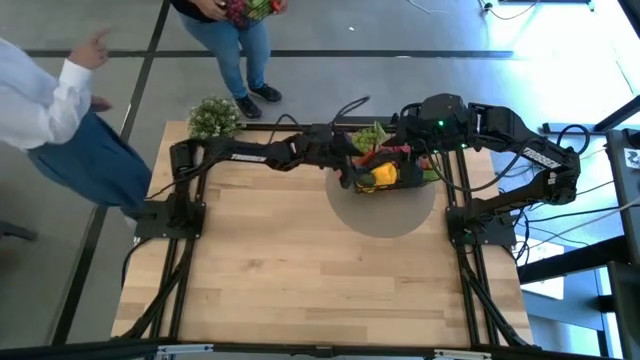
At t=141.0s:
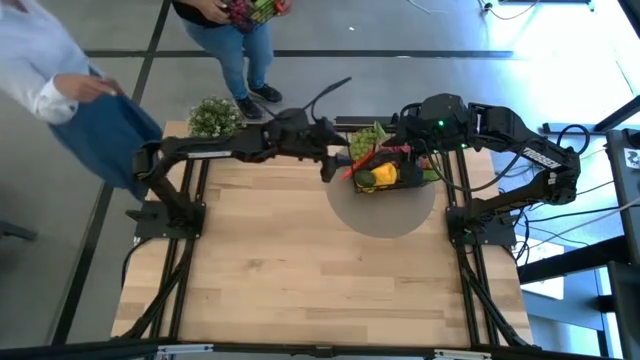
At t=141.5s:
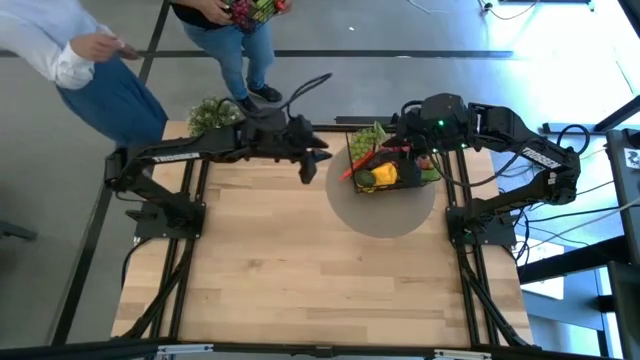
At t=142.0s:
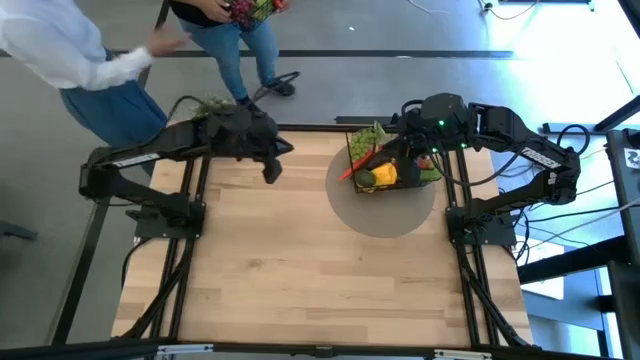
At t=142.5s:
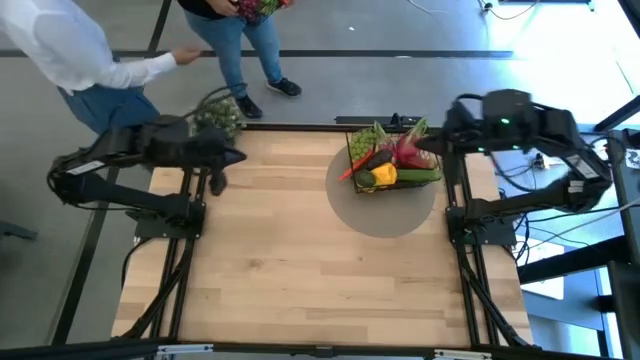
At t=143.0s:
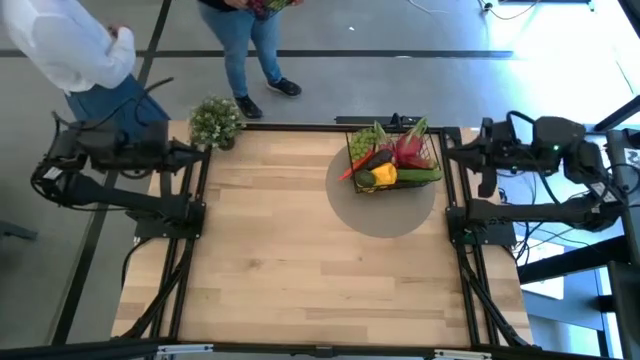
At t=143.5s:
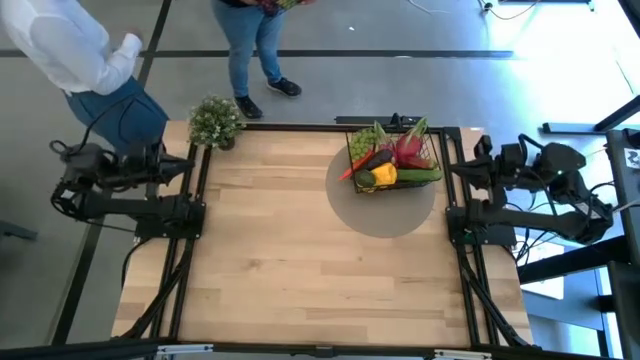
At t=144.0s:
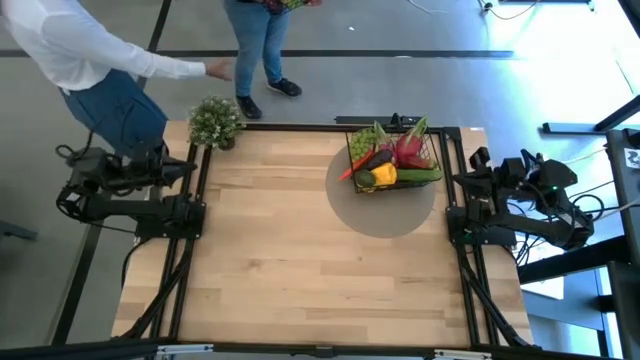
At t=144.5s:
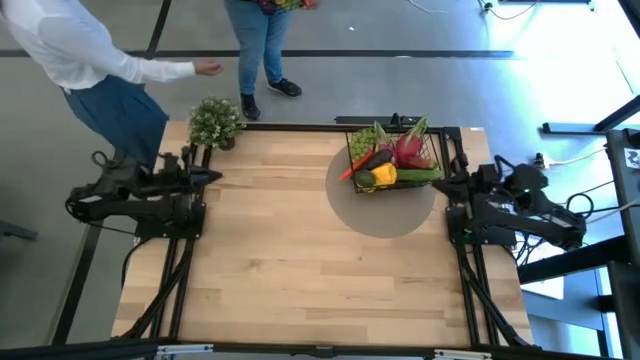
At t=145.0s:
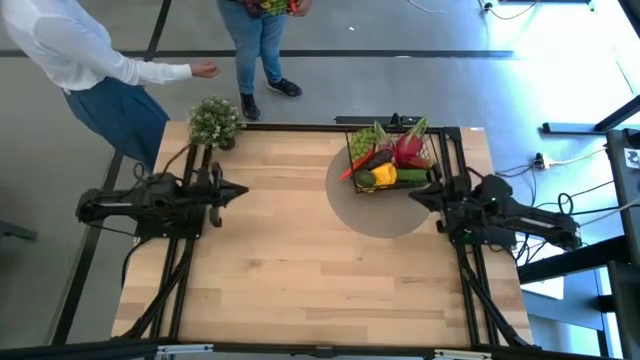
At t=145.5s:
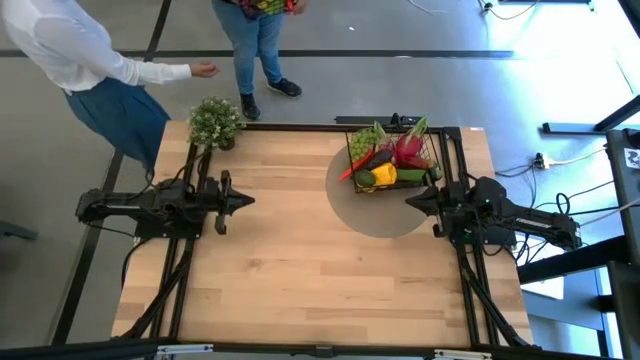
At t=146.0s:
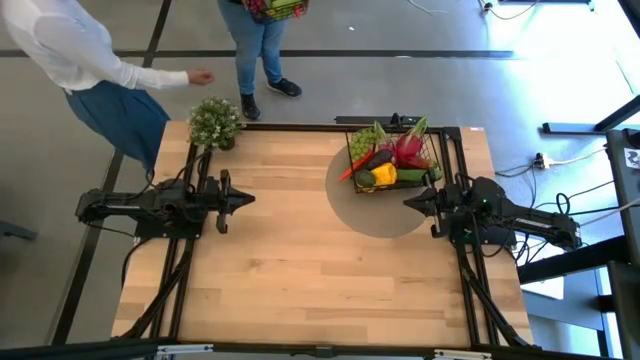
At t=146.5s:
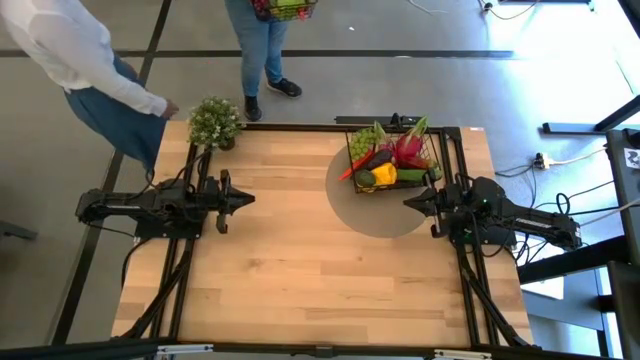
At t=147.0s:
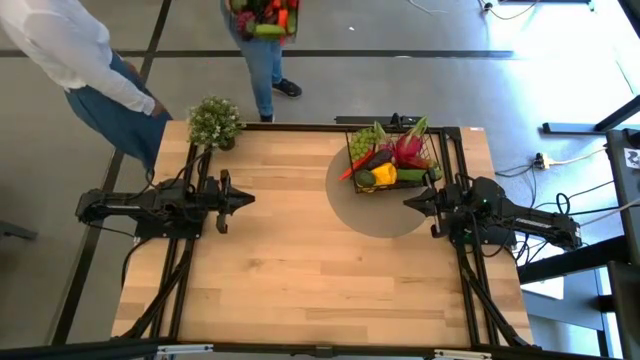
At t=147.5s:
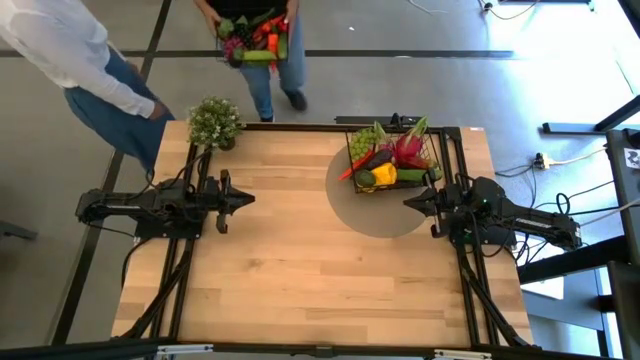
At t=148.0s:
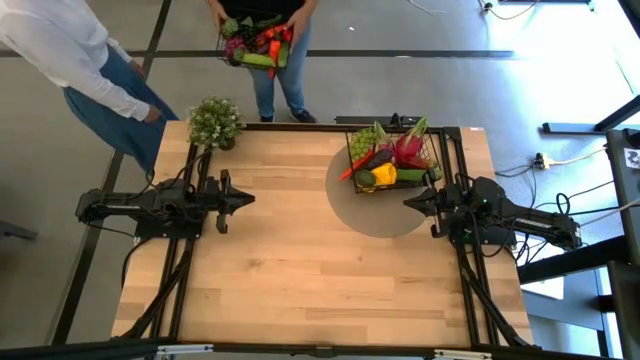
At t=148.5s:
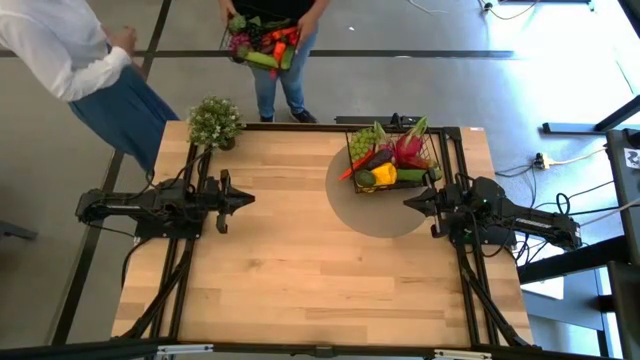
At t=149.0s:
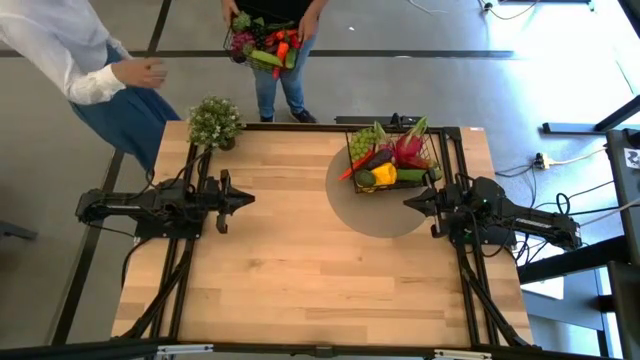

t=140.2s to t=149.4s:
Task: Build produce basket
Return to Home Position

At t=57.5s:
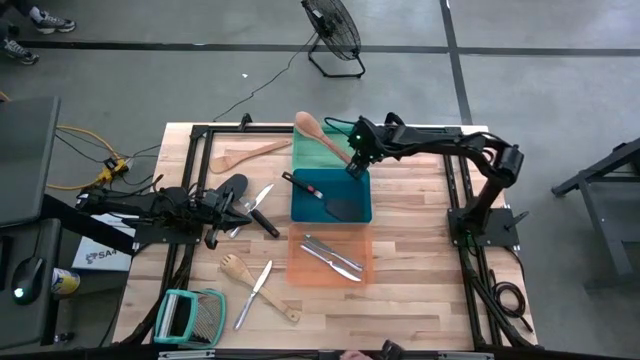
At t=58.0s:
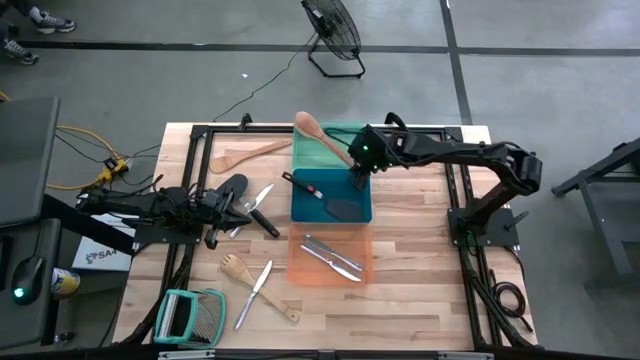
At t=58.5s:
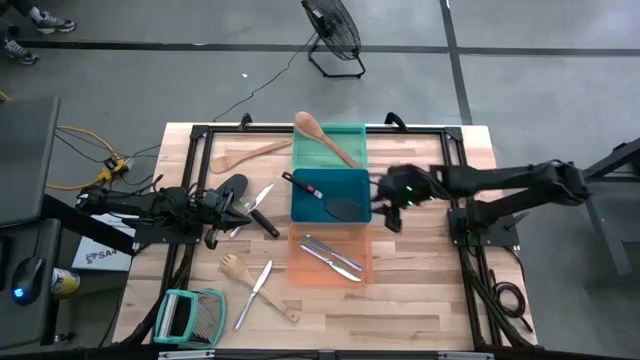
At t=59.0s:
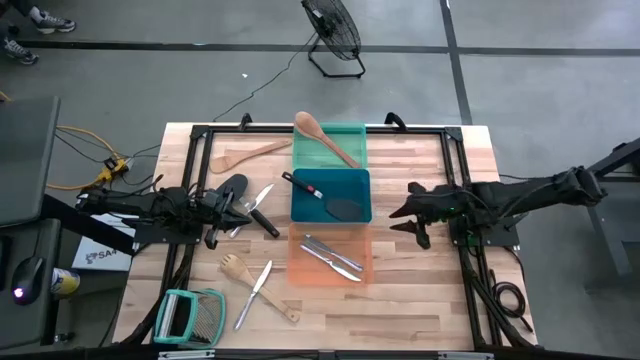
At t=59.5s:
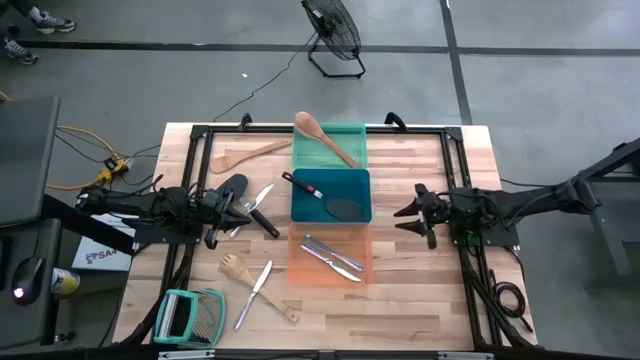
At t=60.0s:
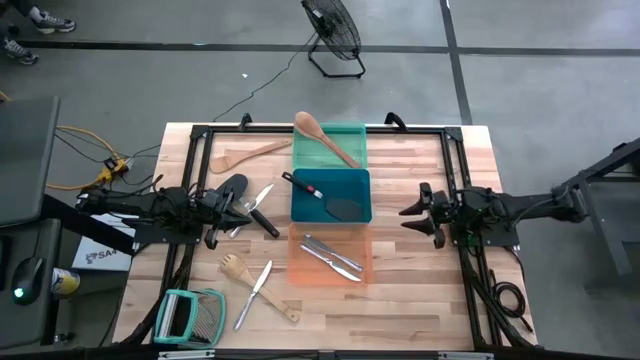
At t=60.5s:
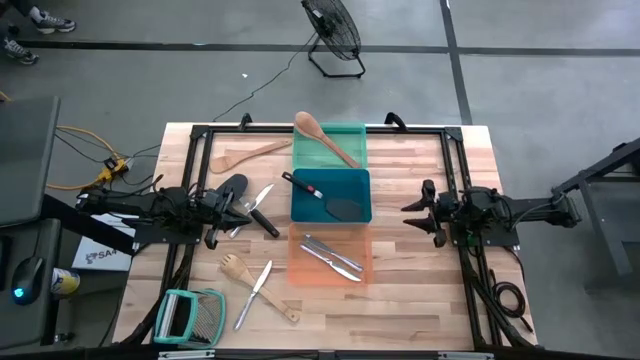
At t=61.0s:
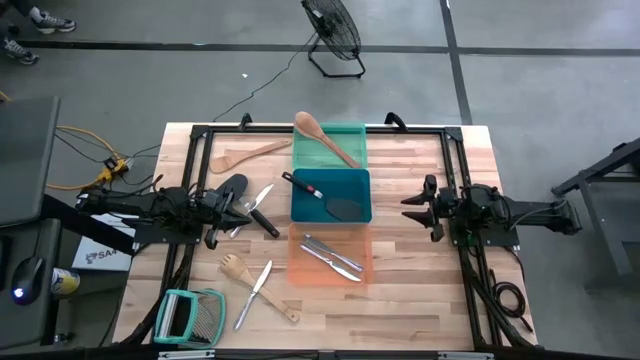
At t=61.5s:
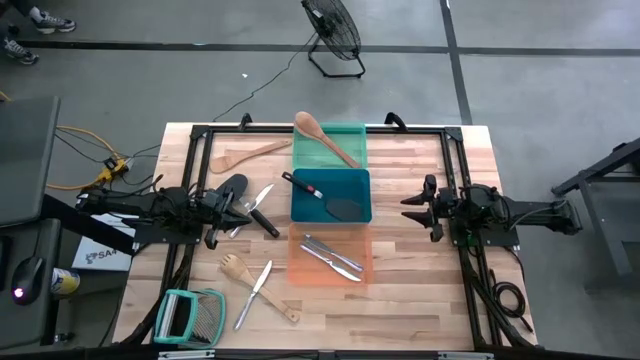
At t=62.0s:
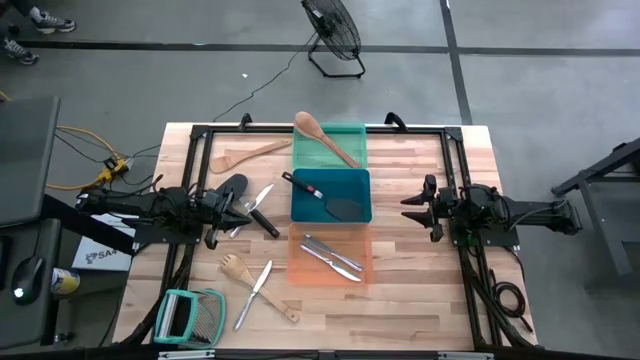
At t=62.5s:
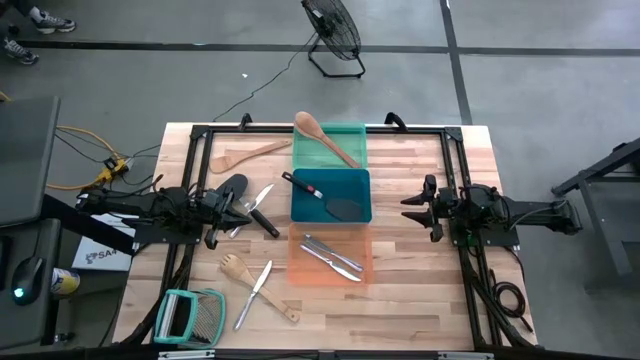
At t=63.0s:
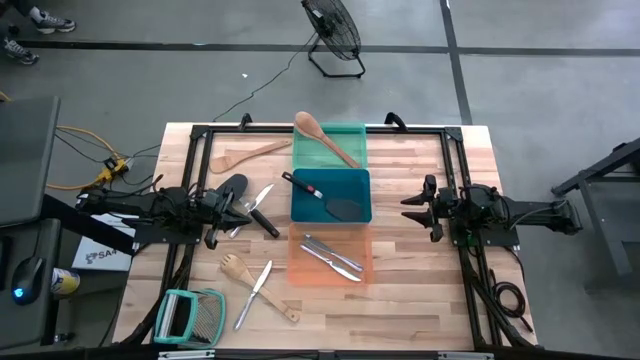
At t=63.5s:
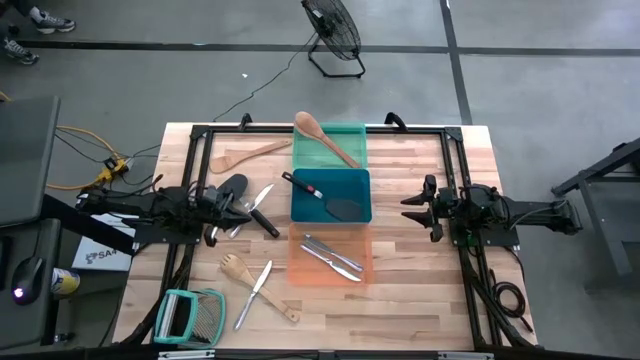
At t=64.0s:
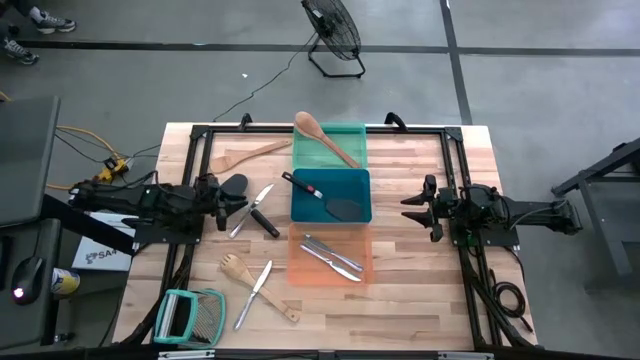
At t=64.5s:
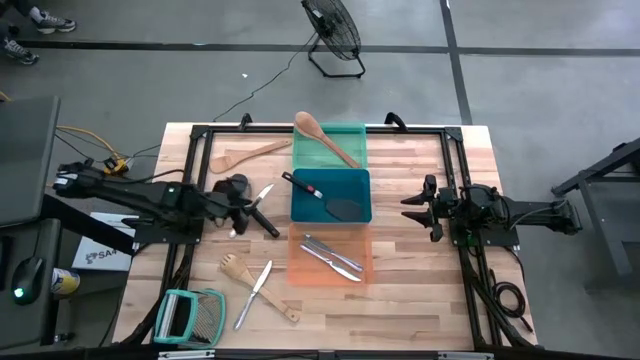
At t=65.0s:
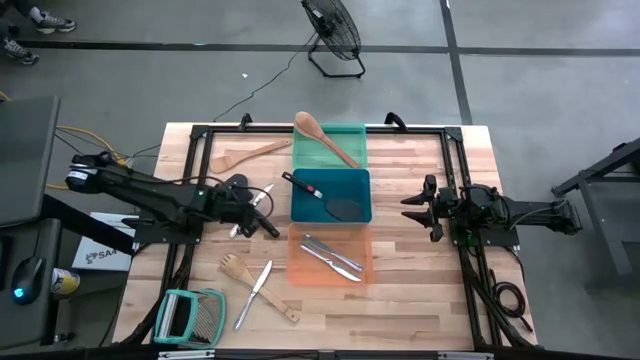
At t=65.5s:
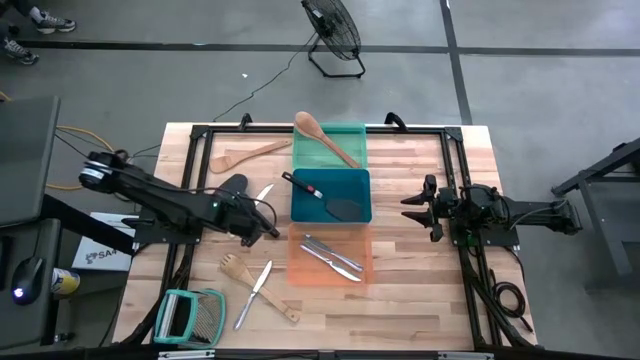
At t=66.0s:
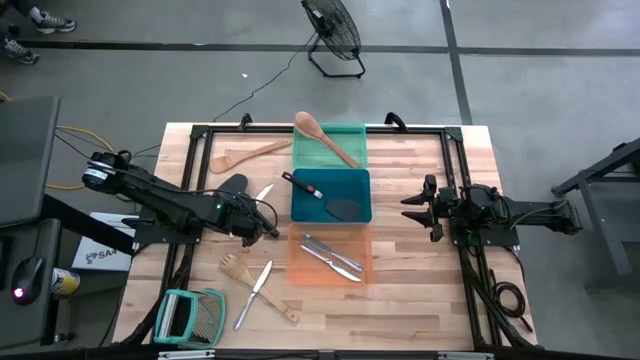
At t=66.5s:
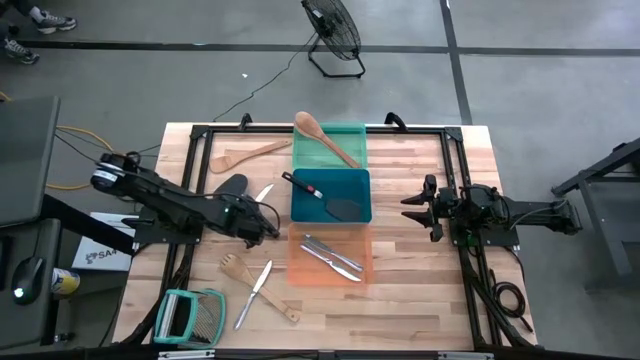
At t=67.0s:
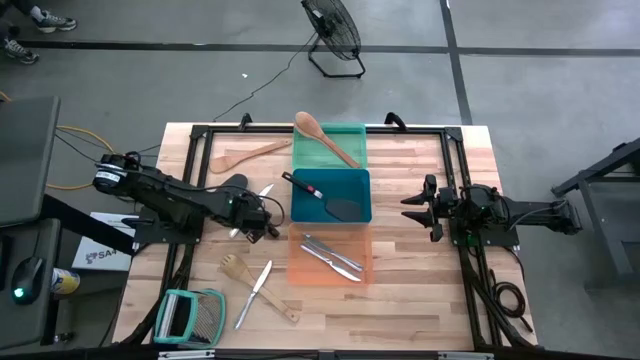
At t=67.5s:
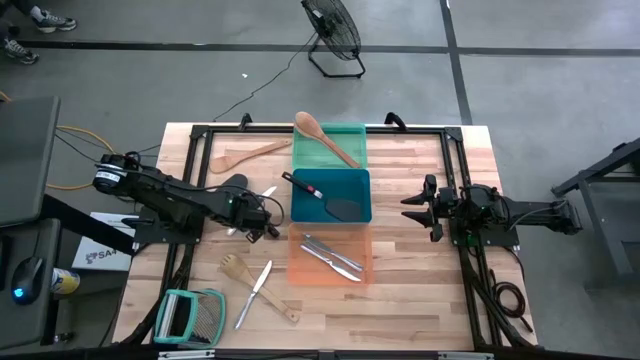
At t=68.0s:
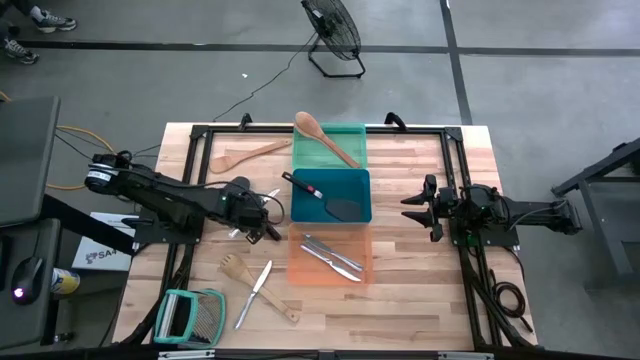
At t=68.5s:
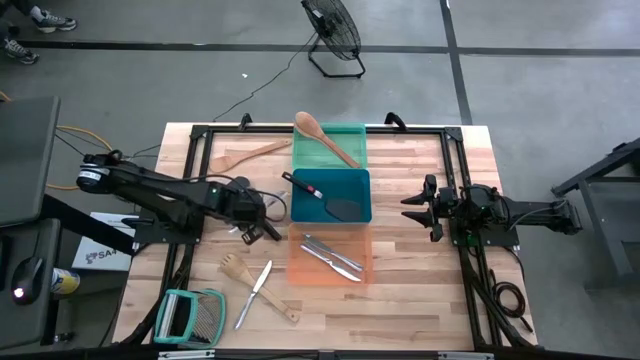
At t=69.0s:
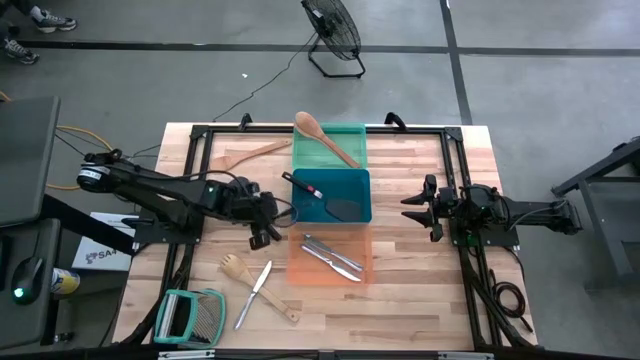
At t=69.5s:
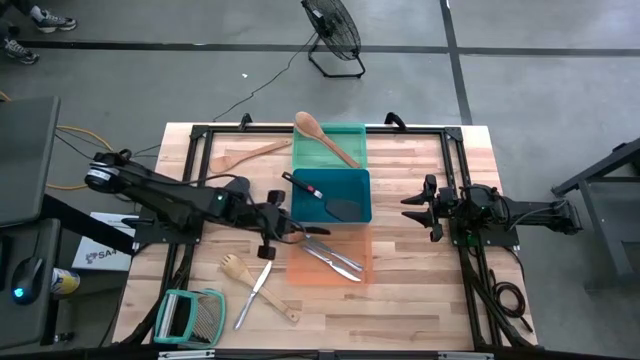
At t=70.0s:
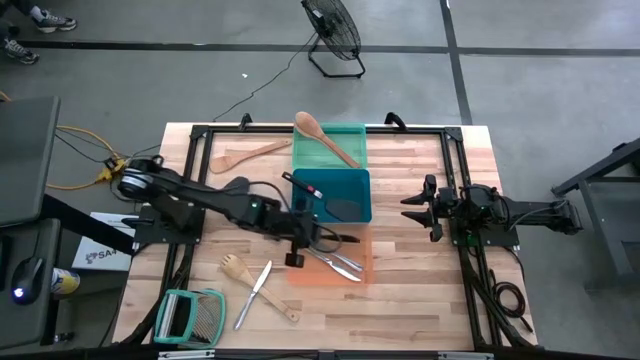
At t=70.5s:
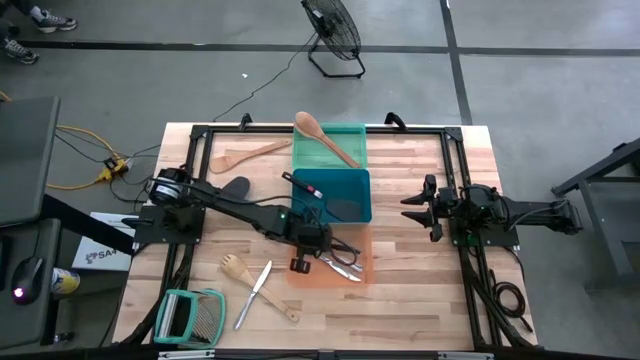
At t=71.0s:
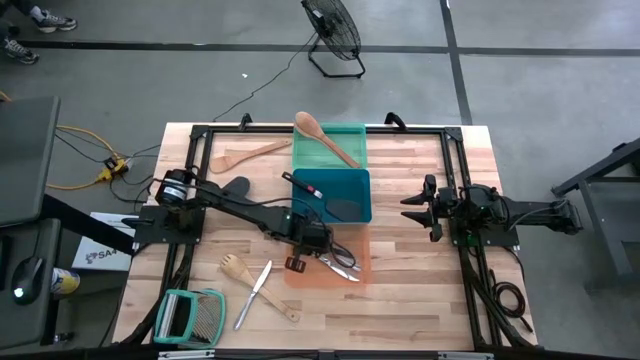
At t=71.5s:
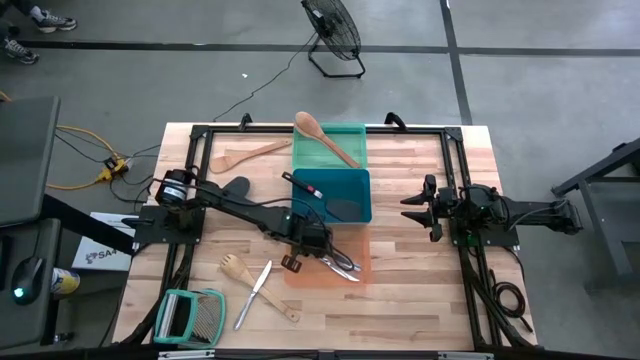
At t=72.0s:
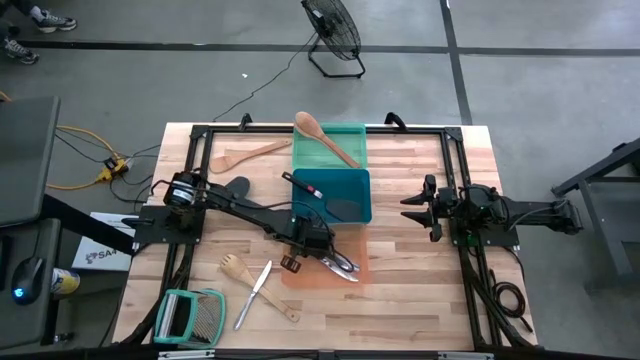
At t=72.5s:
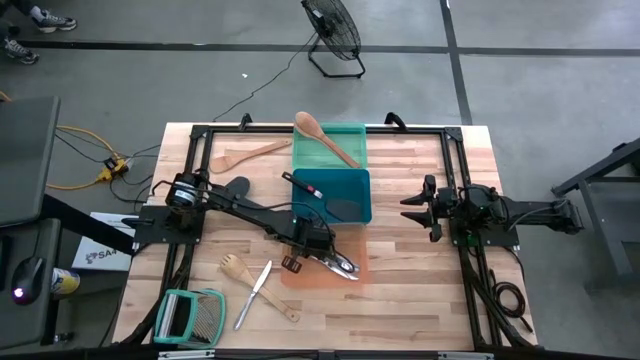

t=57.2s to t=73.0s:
Task: Pick & Place Kitchen Items
Put the silver knife into the orange bin
